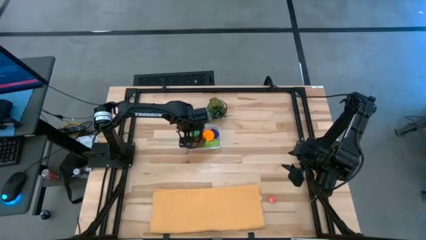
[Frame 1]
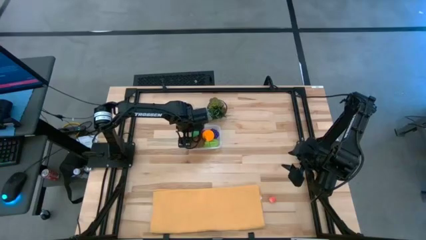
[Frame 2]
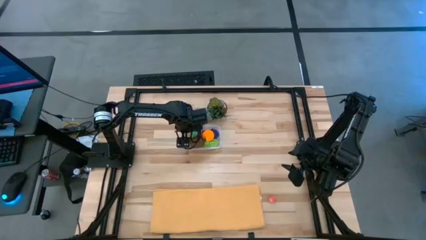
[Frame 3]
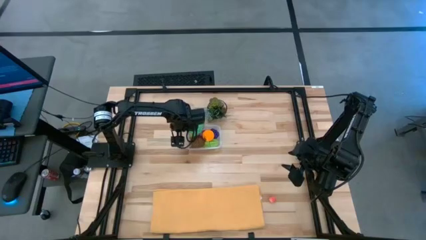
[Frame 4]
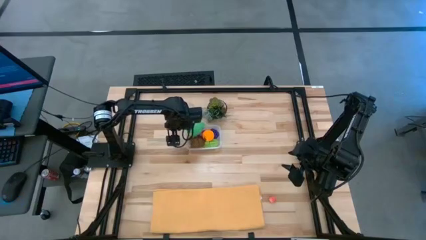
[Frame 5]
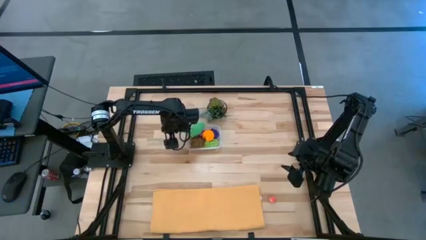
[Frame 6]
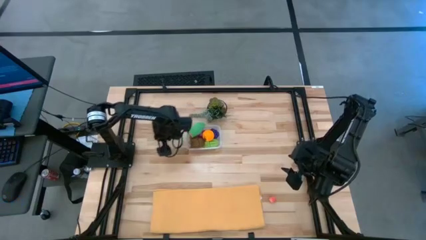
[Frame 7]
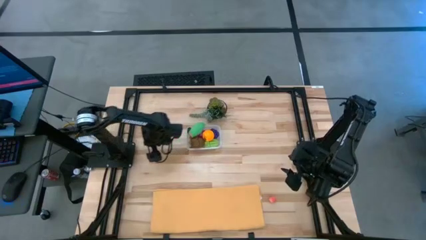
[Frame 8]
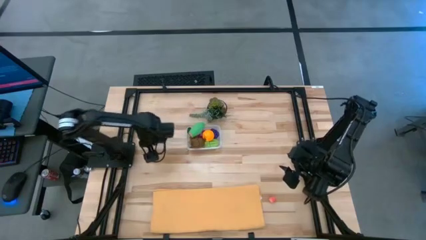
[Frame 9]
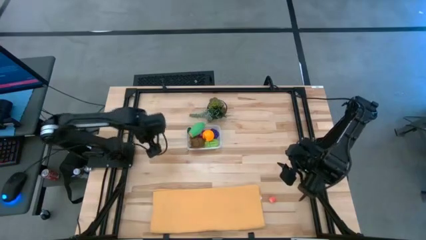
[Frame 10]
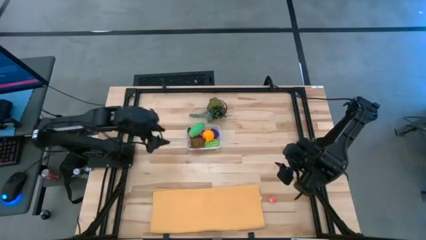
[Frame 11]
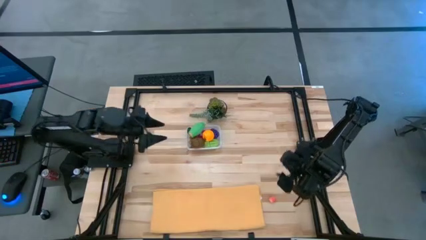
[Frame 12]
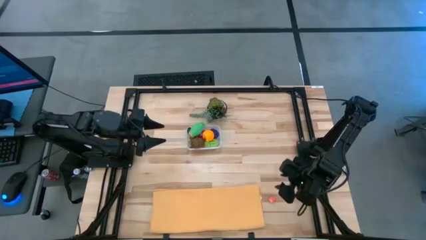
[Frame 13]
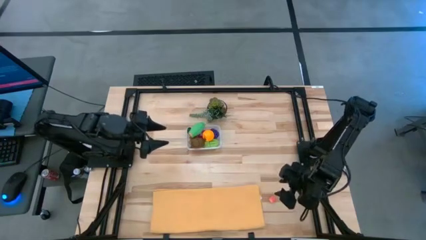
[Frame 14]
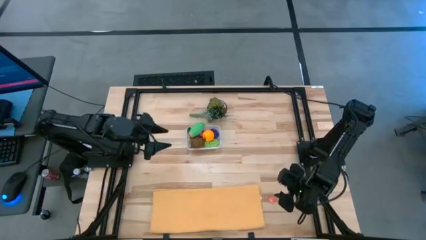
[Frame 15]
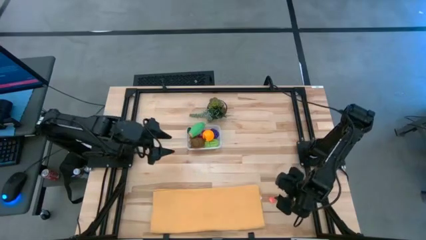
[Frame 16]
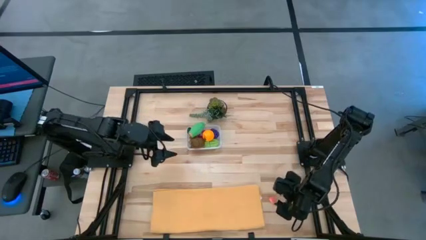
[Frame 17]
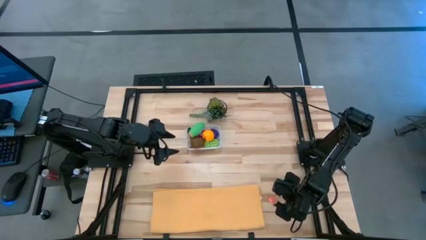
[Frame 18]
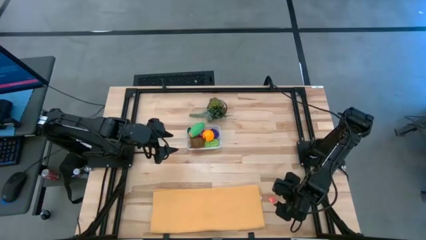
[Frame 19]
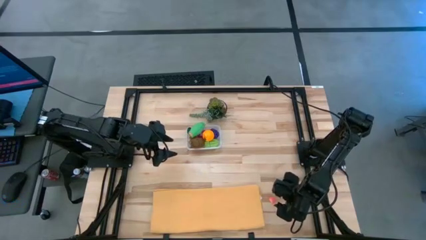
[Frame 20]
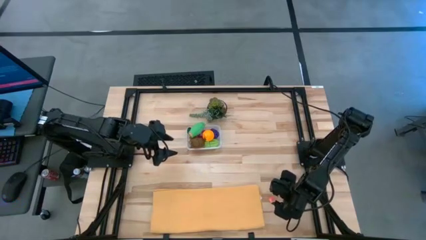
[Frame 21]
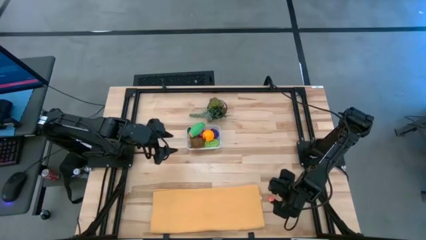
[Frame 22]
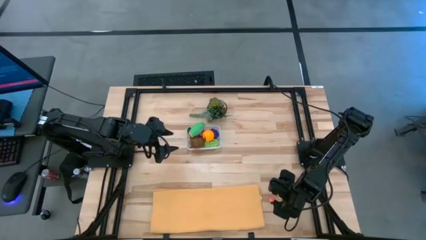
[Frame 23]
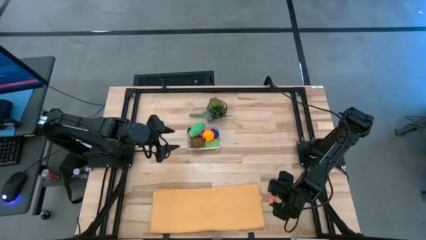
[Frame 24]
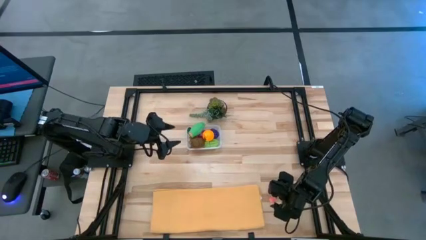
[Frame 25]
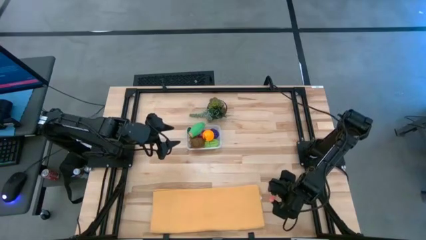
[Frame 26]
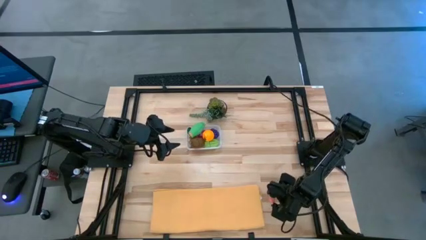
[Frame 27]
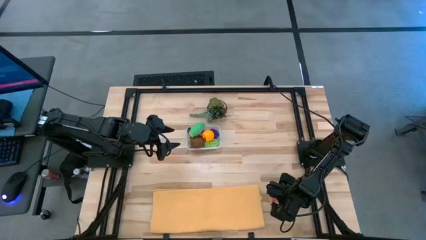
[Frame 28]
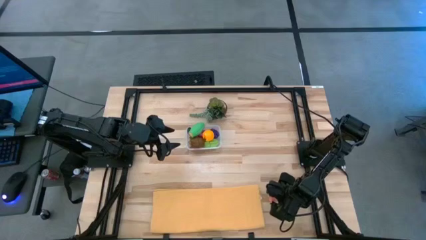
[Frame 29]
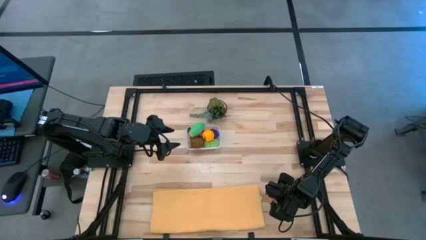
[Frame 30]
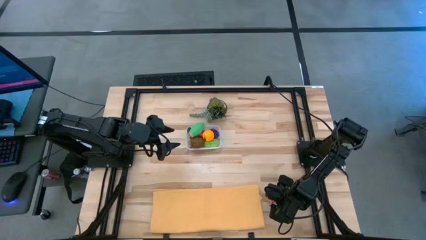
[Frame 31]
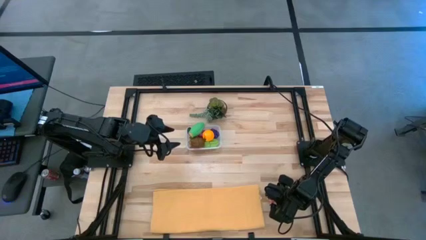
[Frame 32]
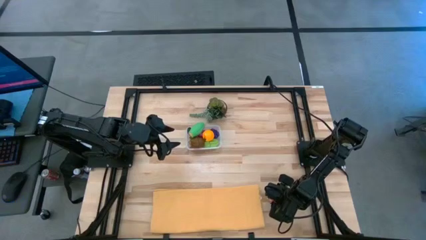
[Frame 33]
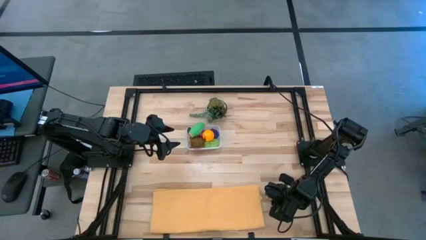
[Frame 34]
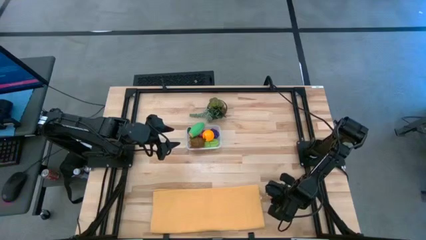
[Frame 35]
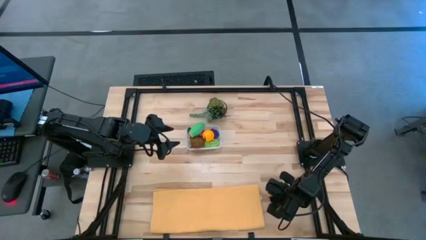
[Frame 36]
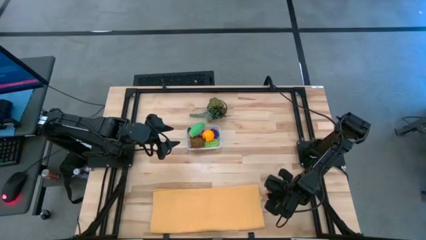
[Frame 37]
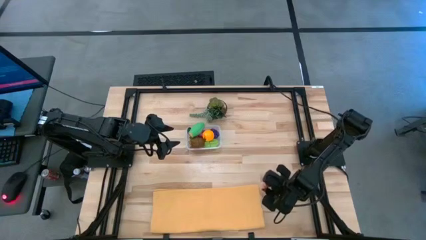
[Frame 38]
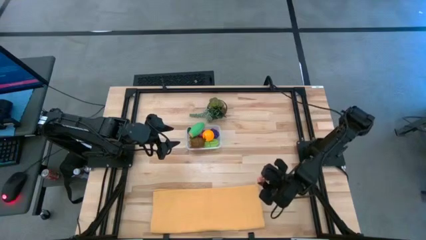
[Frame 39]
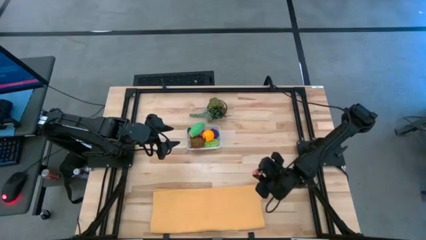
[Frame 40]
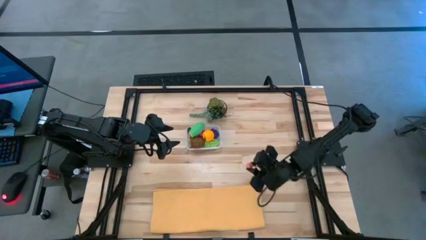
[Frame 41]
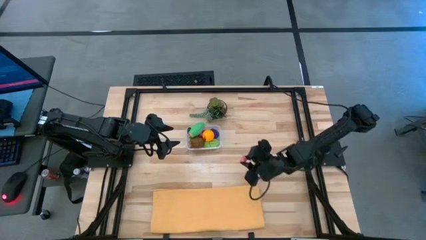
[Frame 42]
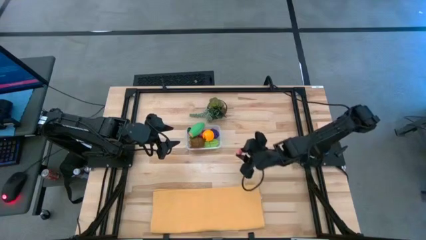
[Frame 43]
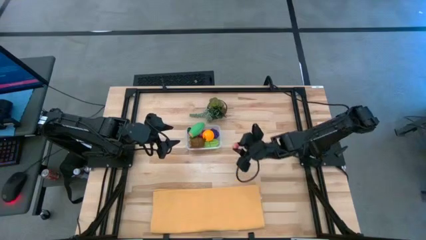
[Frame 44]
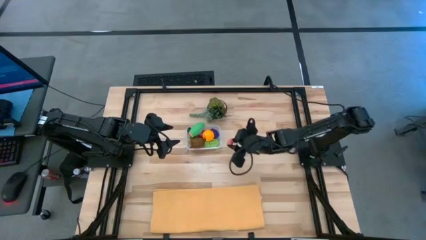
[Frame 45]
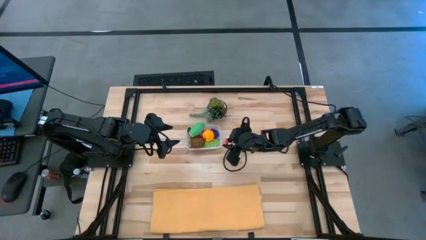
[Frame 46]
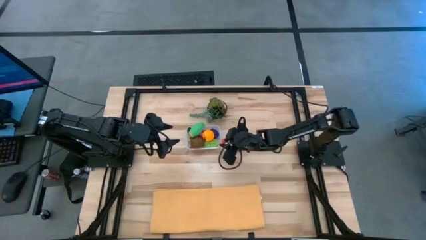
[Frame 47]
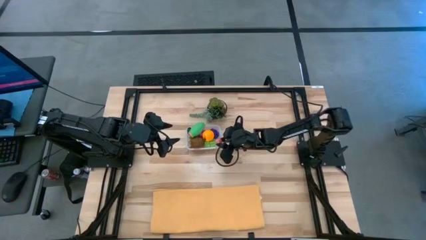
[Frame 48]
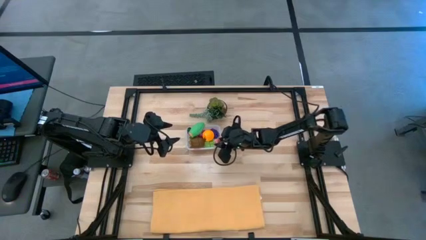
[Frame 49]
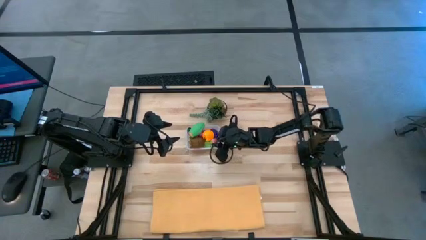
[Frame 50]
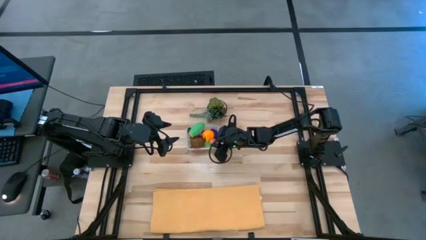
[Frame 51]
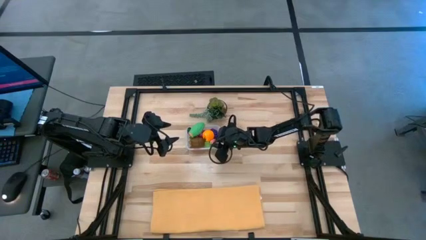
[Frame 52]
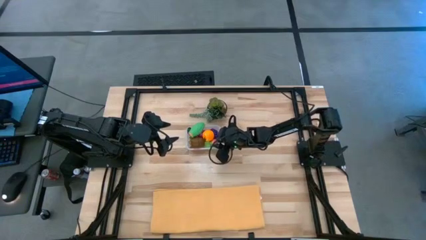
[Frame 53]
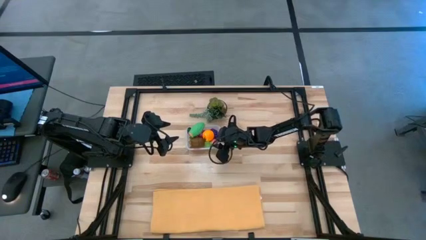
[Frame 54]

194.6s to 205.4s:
Task: Pick and placing Produce into tupperware
Put the pink peach into the transparent bin

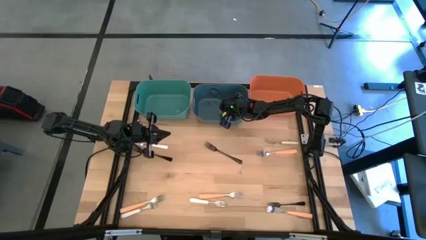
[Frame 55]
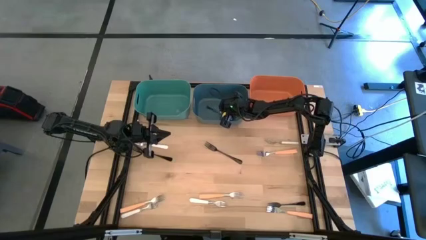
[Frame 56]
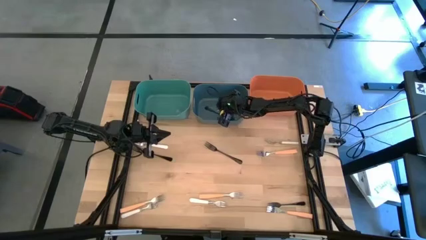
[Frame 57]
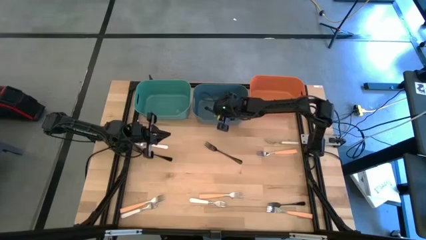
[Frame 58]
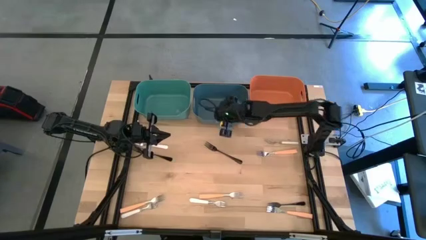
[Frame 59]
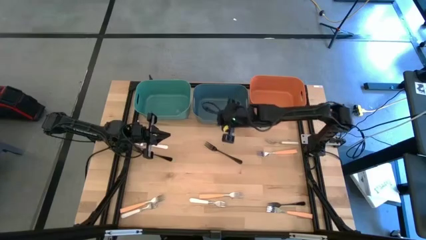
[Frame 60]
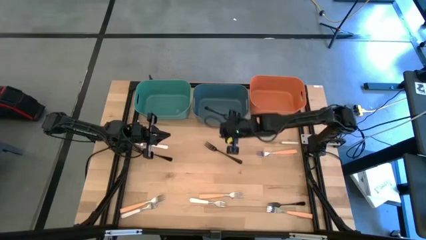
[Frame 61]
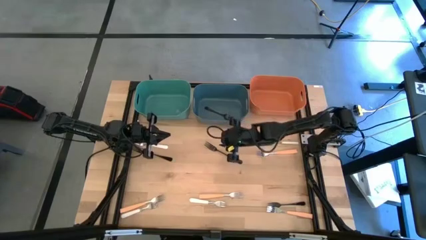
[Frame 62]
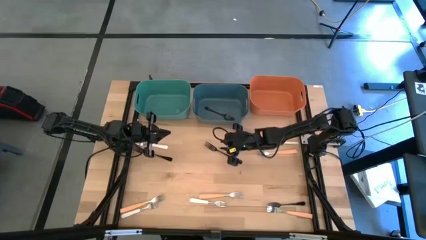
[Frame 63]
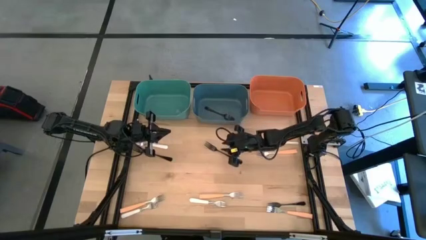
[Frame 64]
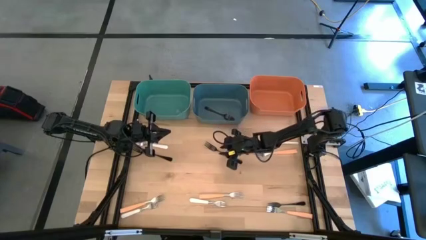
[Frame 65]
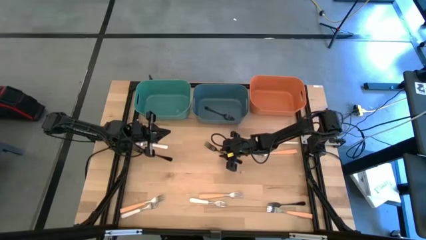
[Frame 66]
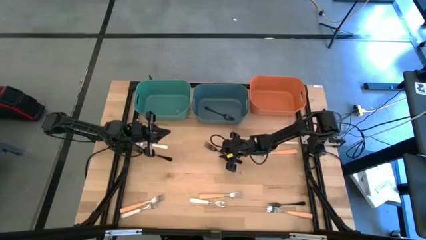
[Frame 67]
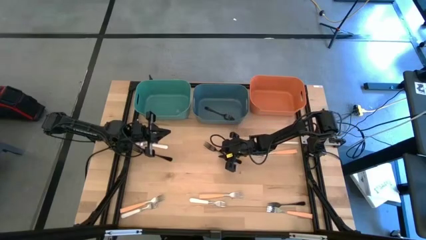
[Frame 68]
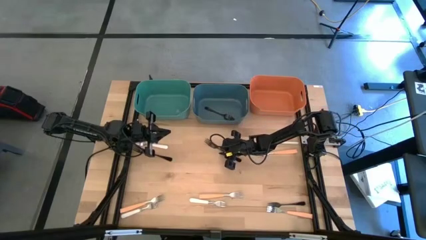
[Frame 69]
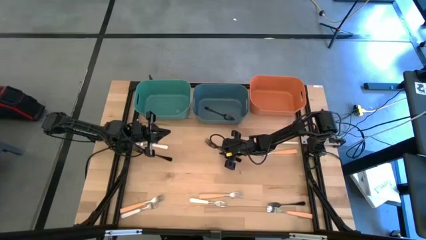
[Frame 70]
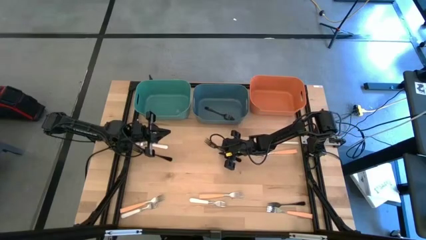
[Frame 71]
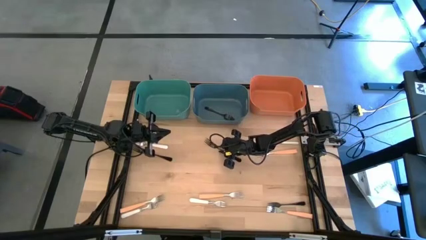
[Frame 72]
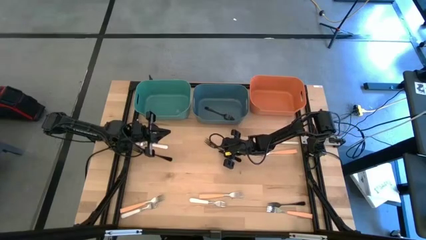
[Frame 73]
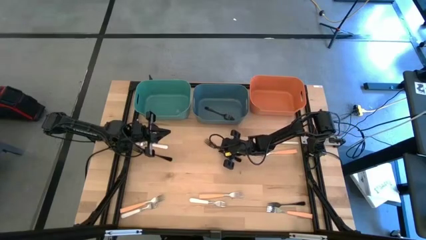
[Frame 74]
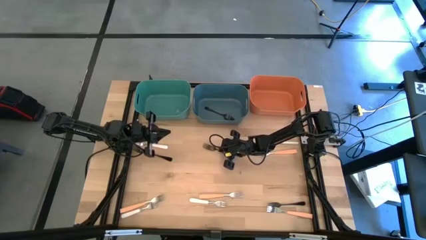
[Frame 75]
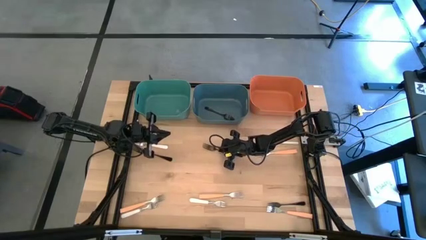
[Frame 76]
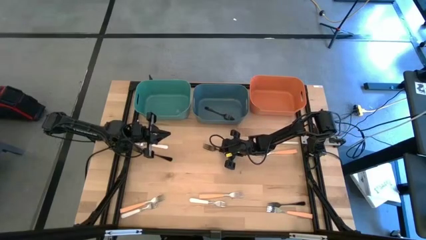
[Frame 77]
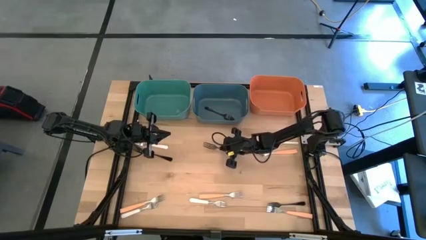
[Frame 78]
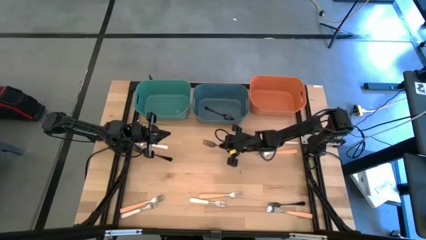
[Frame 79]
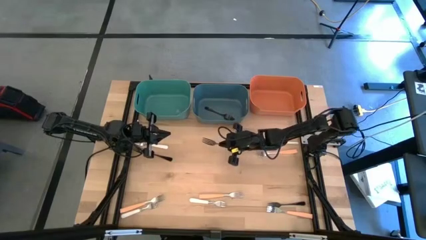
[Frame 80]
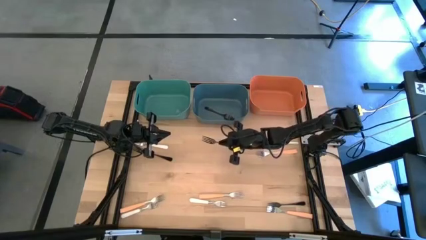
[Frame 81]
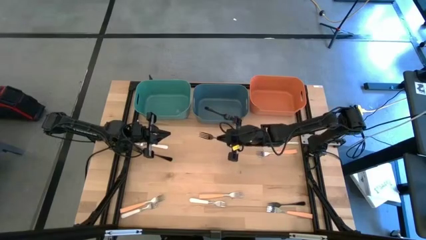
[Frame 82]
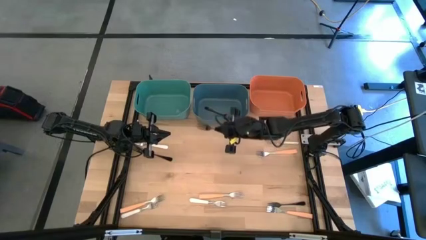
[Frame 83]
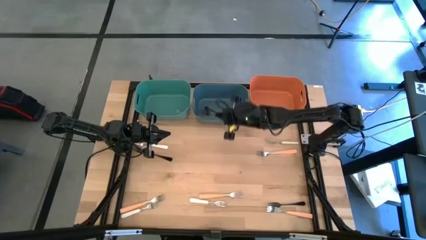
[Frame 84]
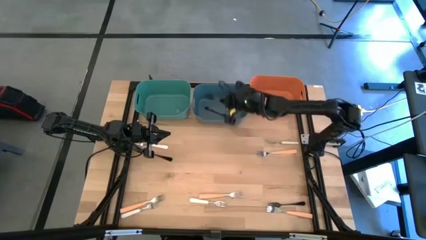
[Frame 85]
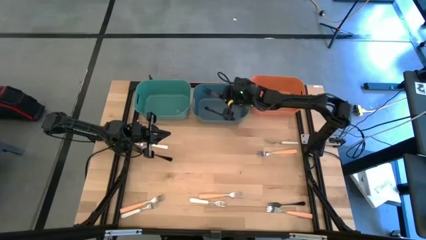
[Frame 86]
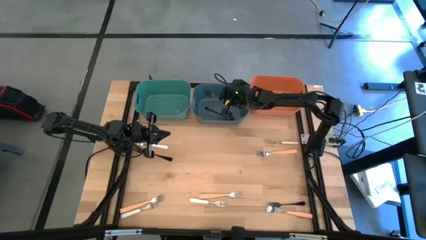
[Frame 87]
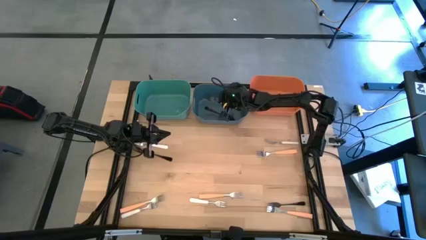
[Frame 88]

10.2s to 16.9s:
Task: Sort silverware by color (type)
Put the top right black fork into the blue bin
